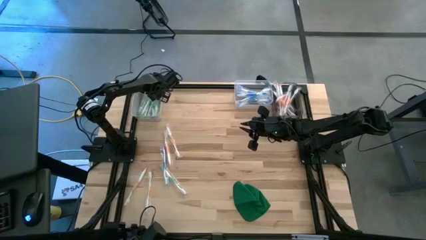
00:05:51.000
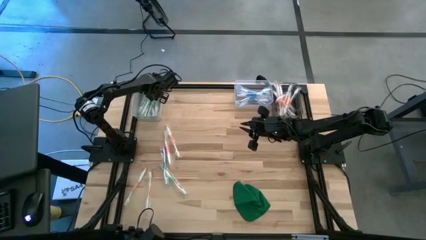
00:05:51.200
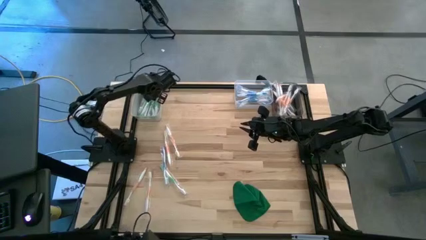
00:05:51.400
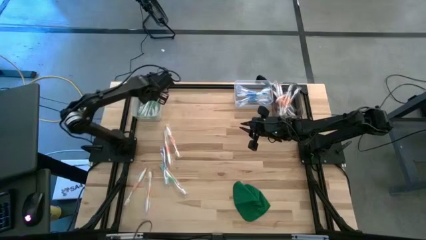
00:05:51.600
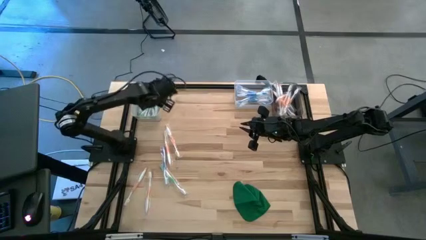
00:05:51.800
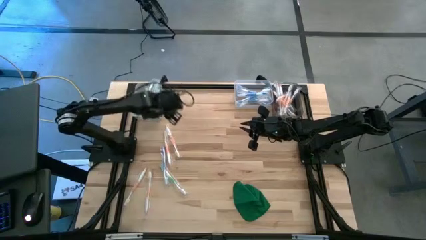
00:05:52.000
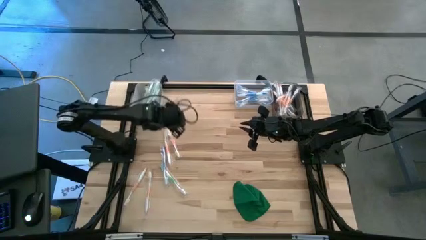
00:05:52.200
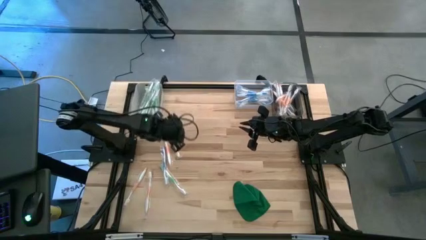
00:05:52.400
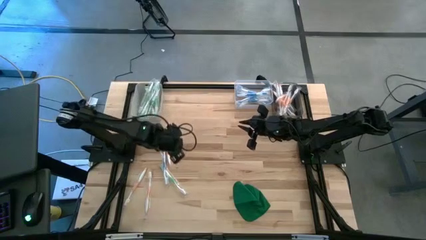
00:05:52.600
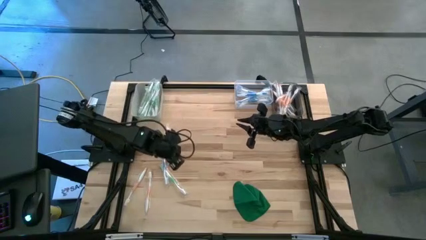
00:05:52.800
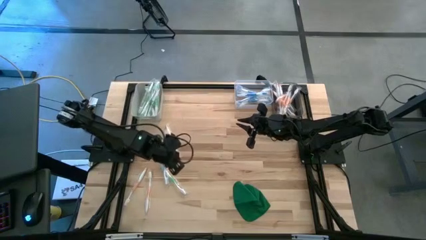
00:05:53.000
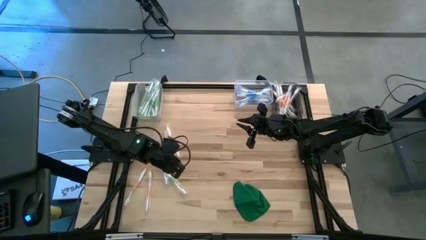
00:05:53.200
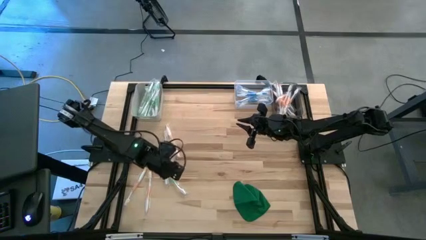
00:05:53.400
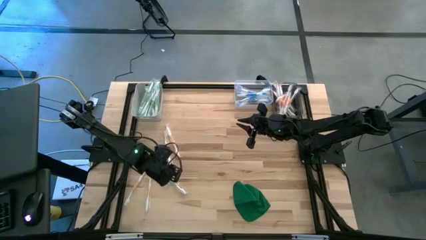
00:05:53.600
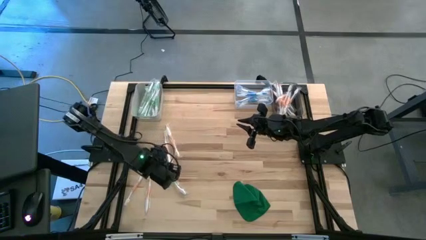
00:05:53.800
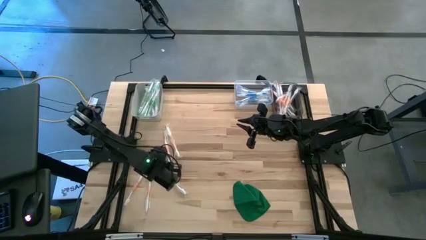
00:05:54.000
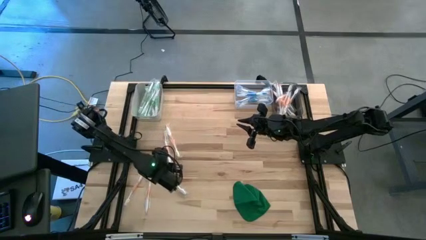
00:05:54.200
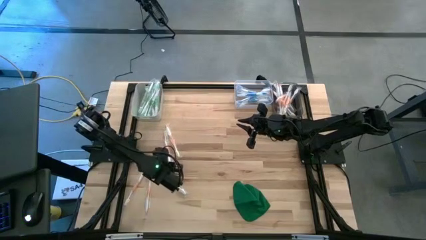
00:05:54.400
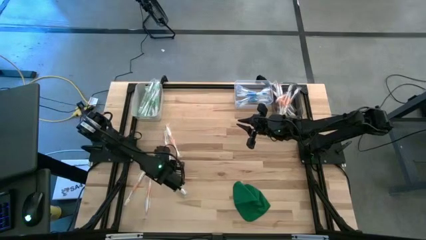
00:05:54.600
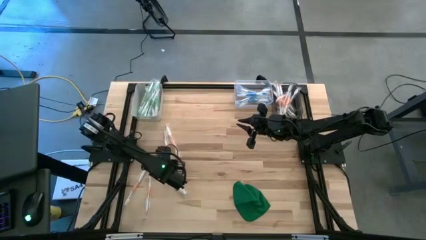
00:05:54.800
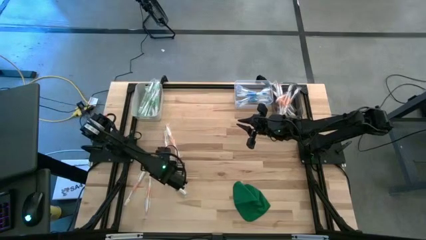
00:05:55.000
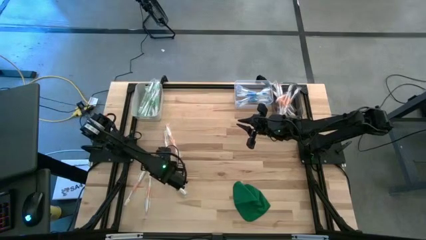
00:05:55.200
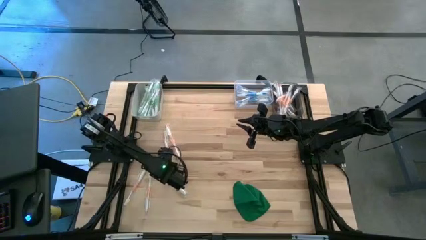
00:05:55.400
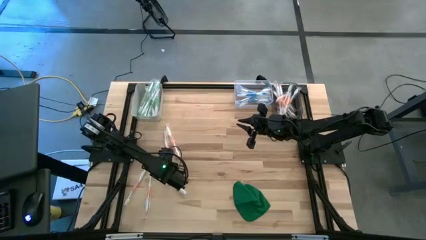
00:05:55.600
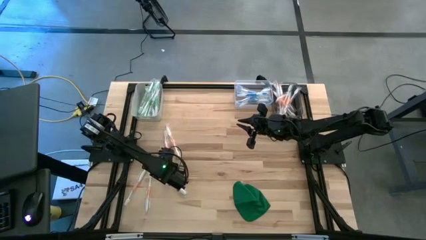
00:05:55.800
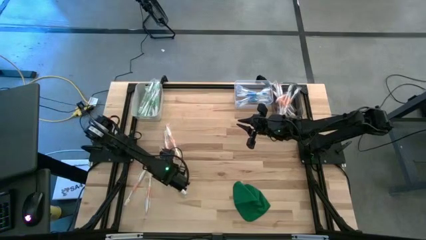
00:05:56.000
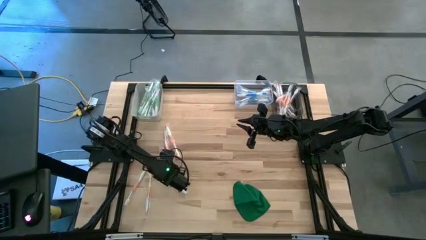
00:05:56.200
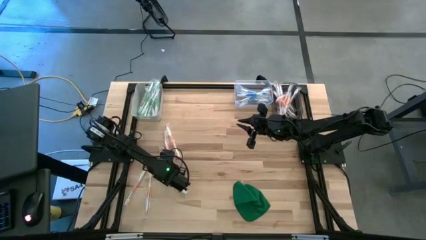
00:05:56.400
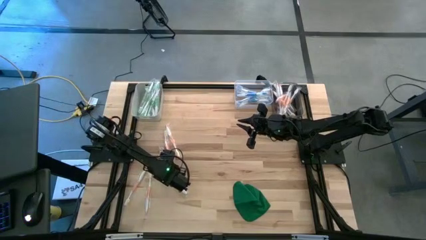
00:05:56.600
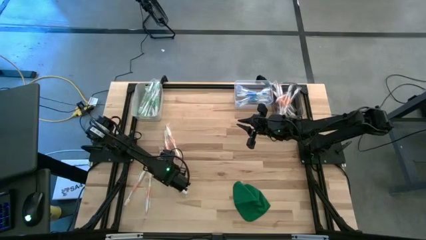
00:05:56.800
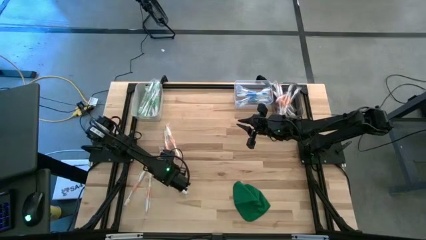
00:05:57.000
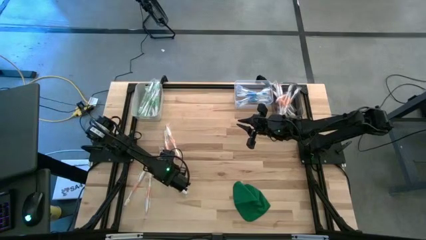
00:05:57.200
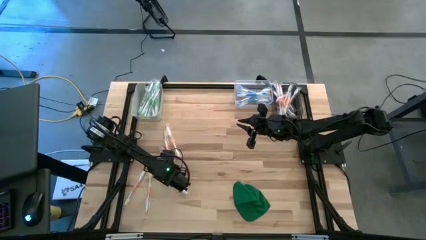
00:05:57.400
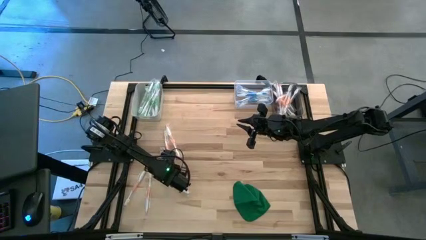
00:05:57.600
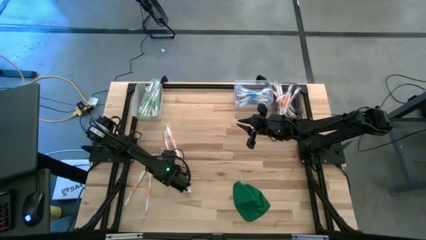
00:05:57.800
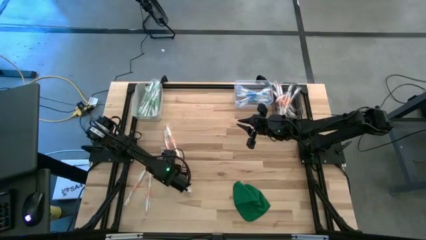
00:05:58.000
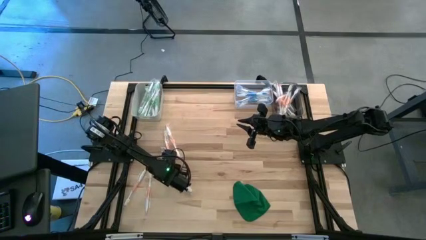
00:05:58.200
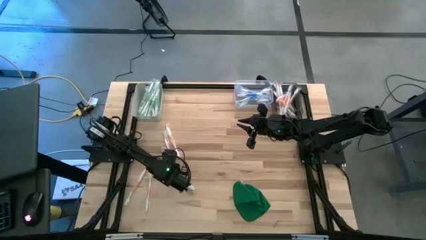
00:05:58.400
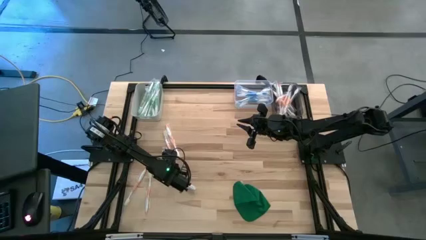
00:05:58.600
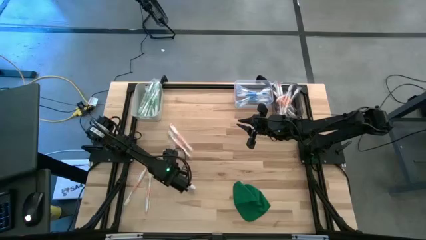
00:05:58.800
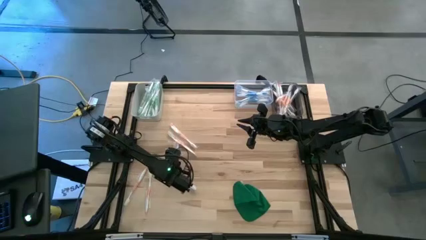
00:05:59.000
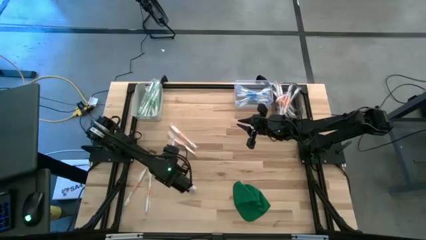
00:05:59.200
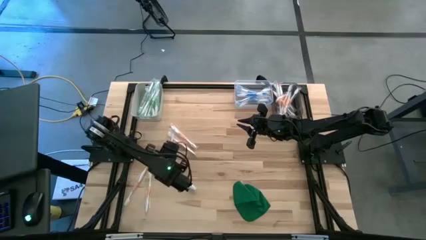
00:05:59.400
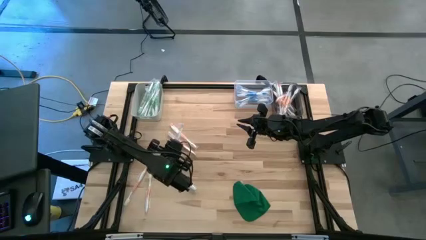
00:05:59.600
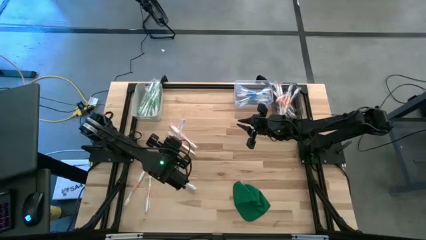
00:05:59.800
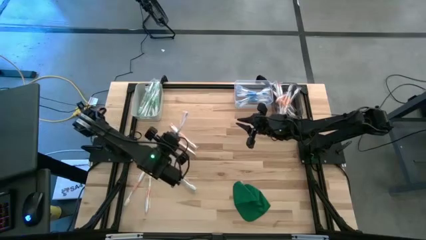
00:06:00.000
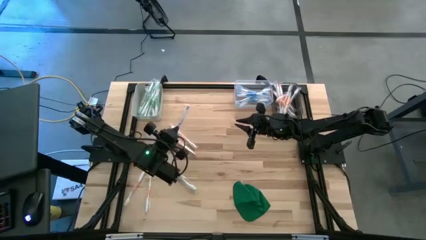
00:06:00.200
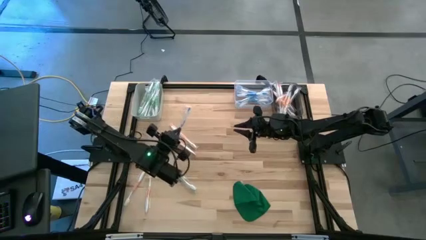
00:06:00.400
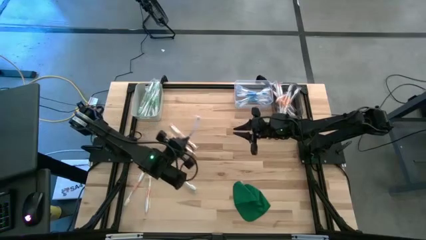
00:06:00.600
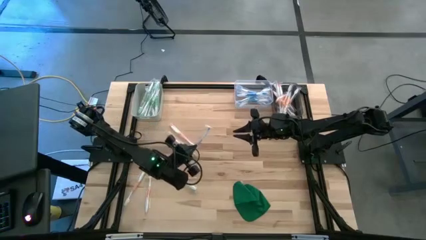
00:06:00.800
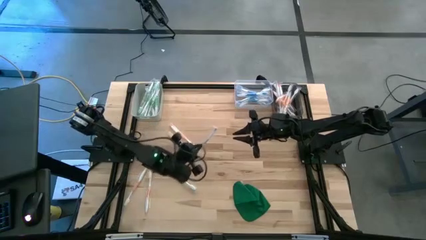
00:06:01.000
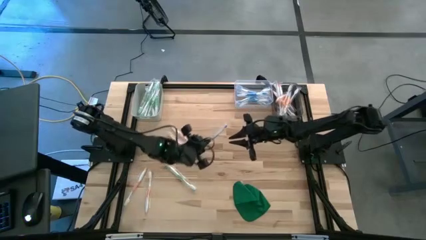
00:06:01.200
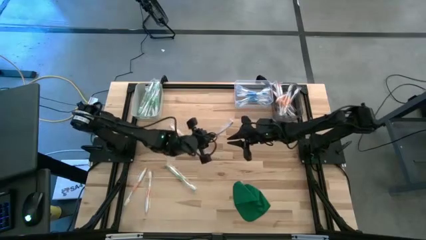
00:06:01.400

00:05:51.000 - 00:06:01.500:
Task: Pick & Place Toothbrushes
Put the blue toothbrush into the transparent bin
